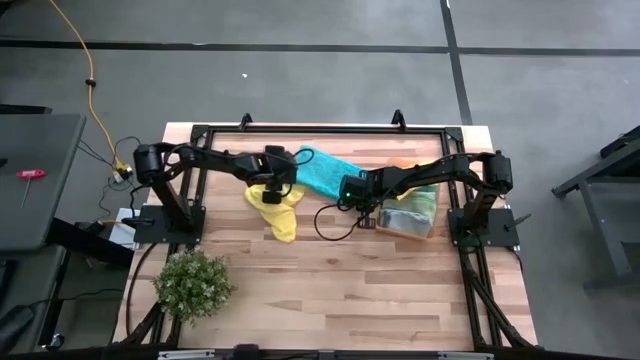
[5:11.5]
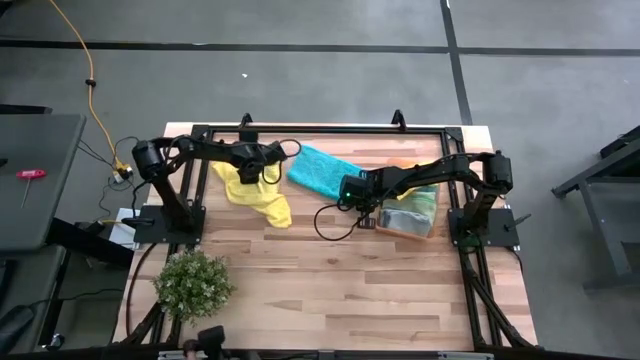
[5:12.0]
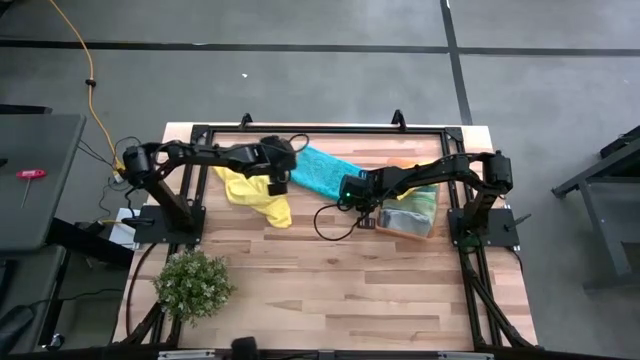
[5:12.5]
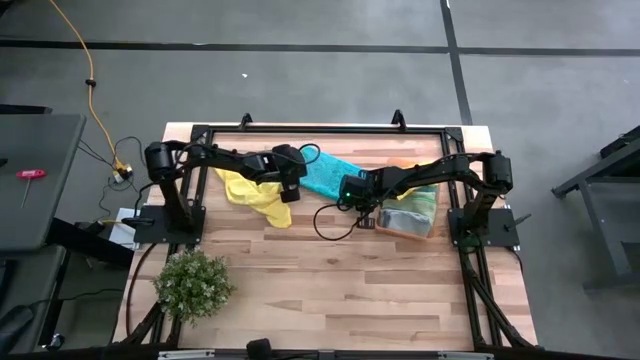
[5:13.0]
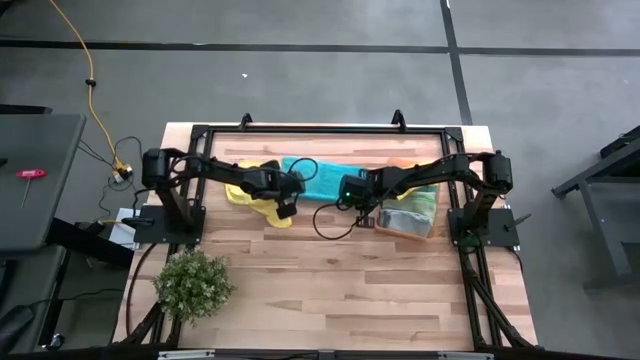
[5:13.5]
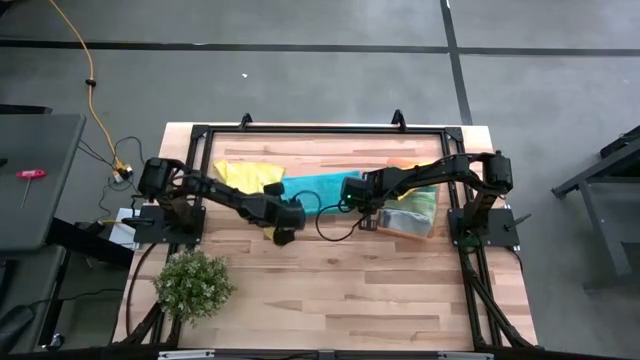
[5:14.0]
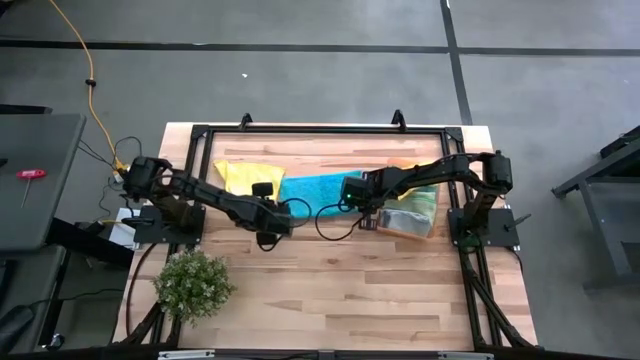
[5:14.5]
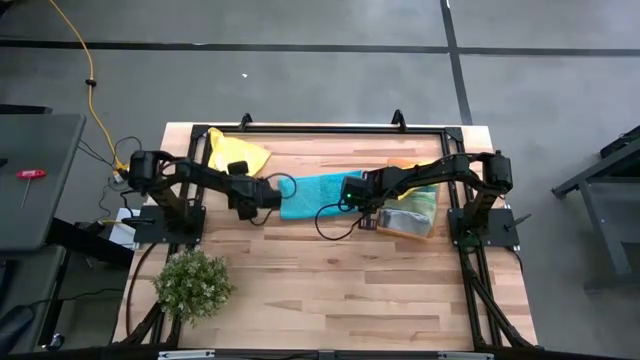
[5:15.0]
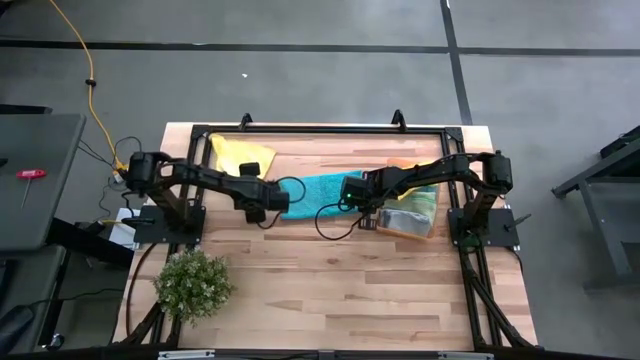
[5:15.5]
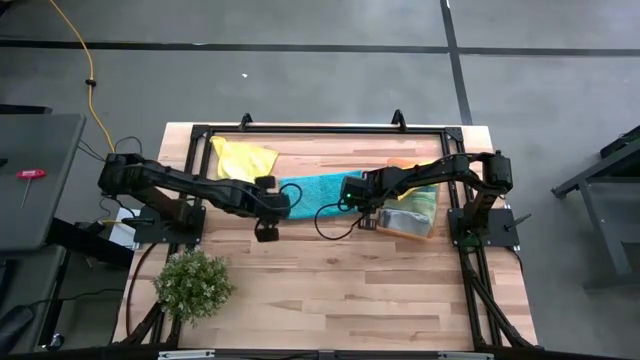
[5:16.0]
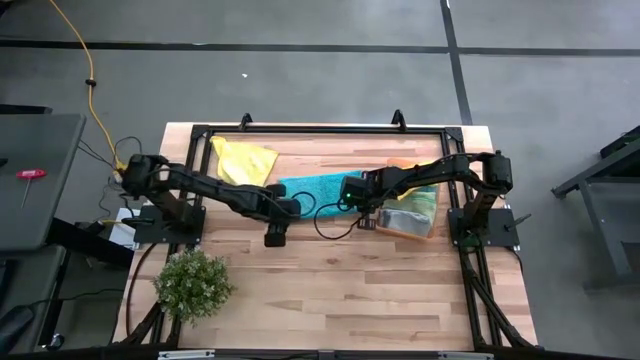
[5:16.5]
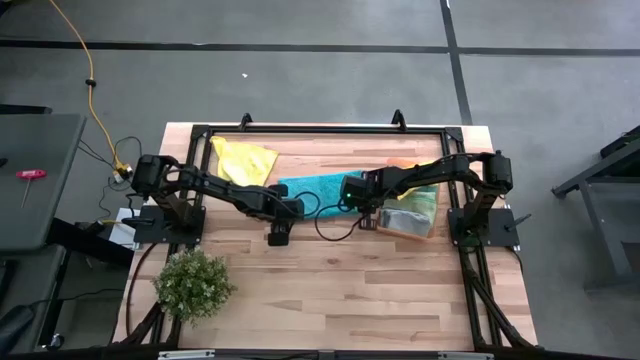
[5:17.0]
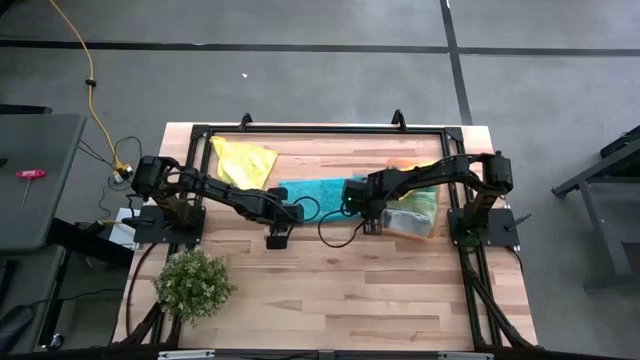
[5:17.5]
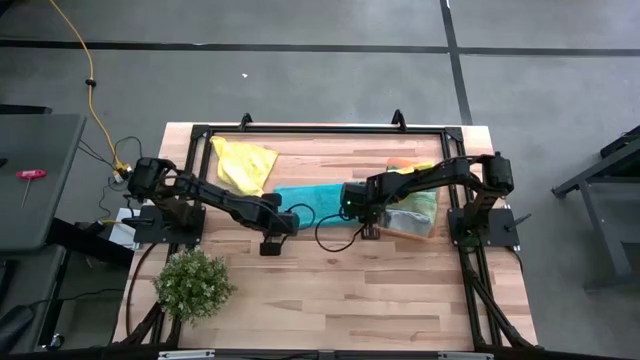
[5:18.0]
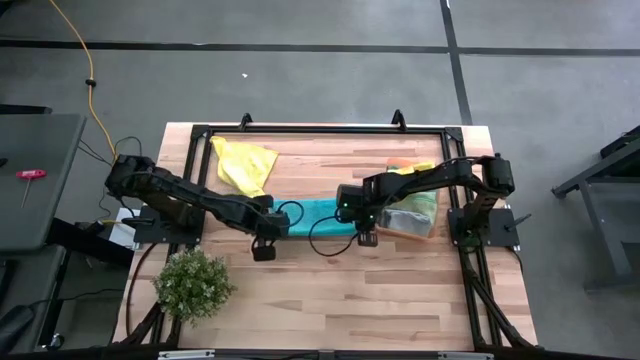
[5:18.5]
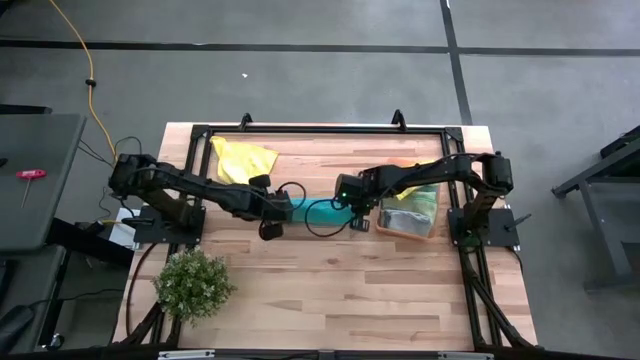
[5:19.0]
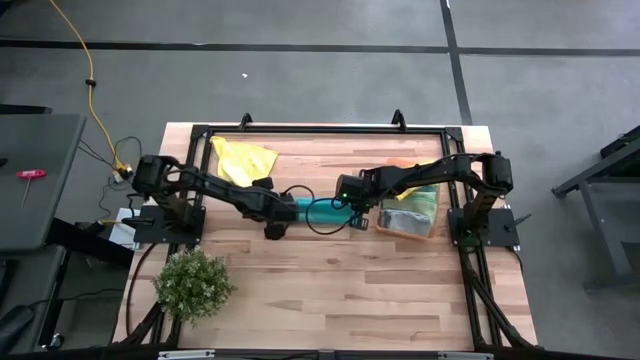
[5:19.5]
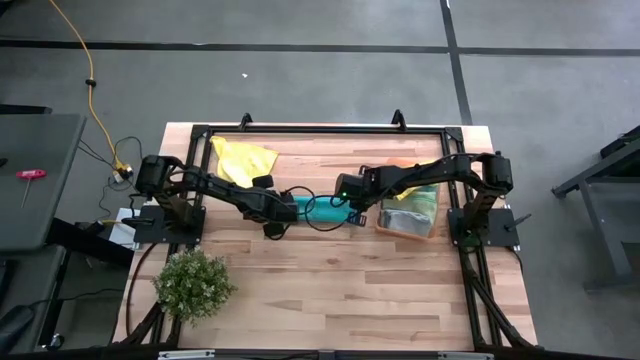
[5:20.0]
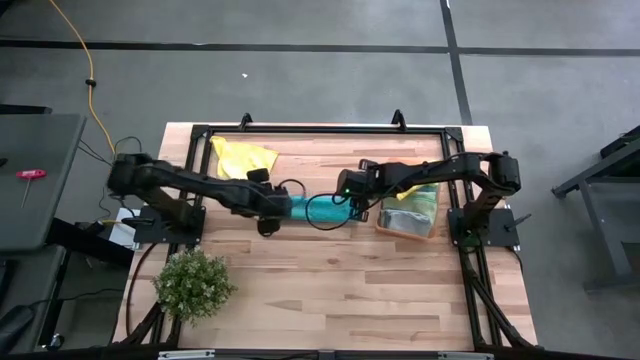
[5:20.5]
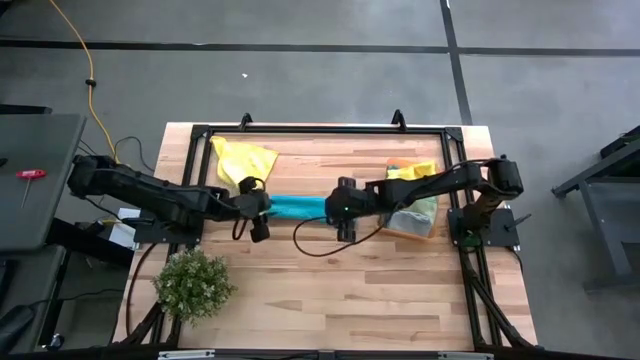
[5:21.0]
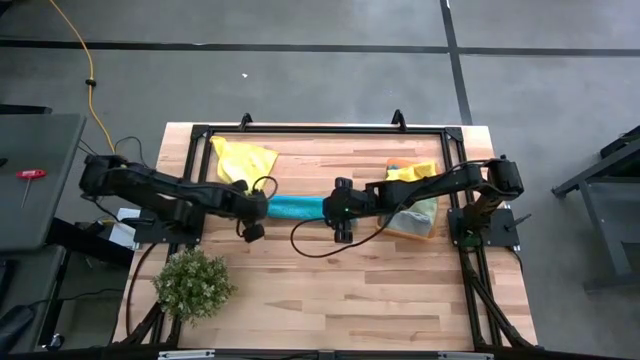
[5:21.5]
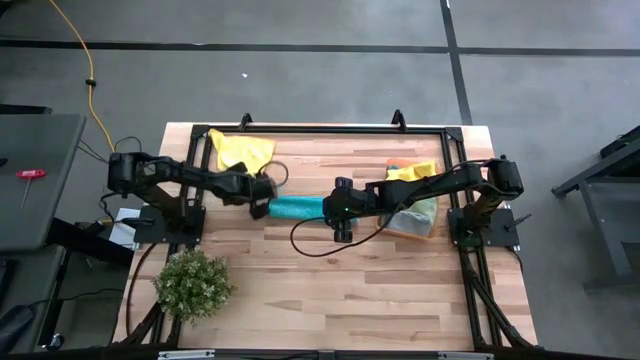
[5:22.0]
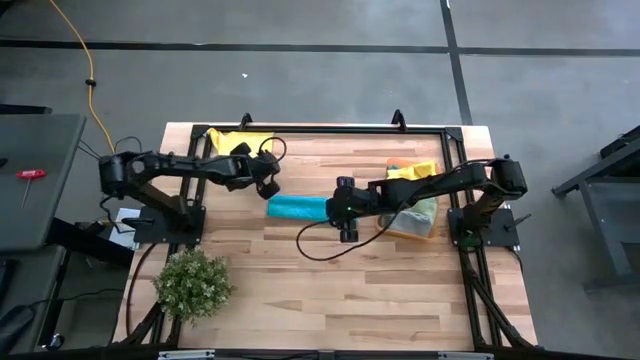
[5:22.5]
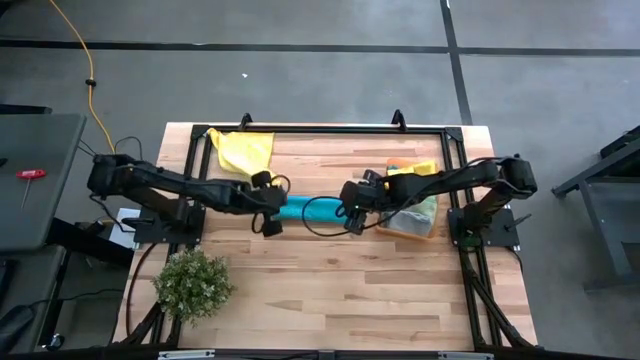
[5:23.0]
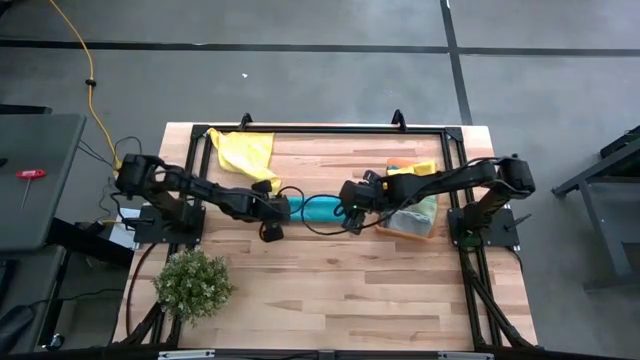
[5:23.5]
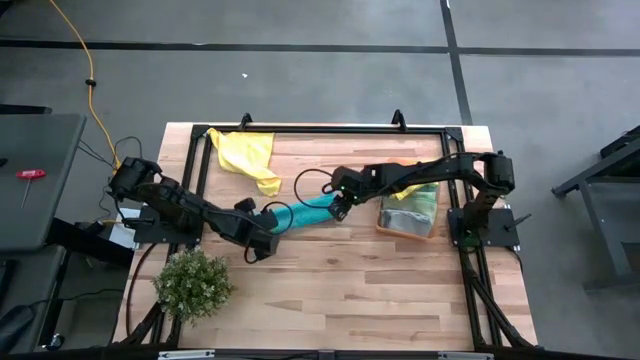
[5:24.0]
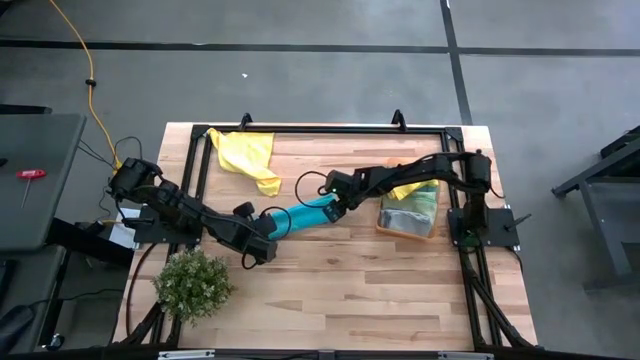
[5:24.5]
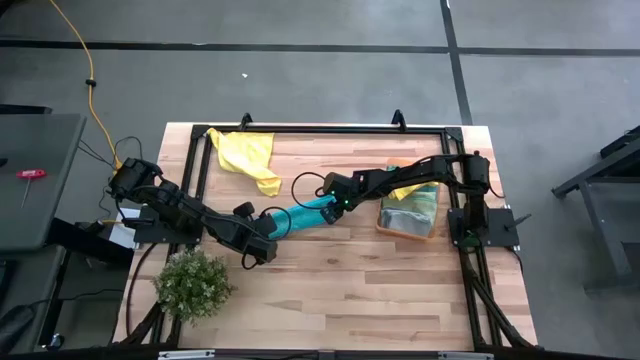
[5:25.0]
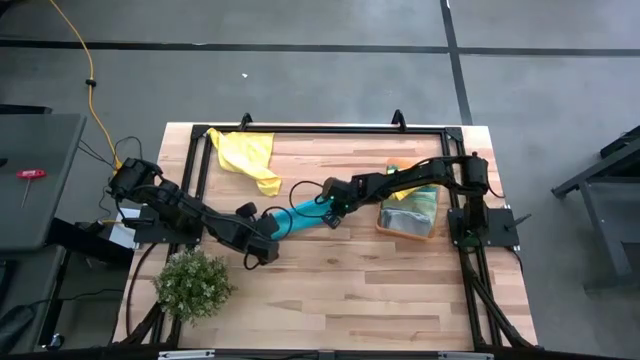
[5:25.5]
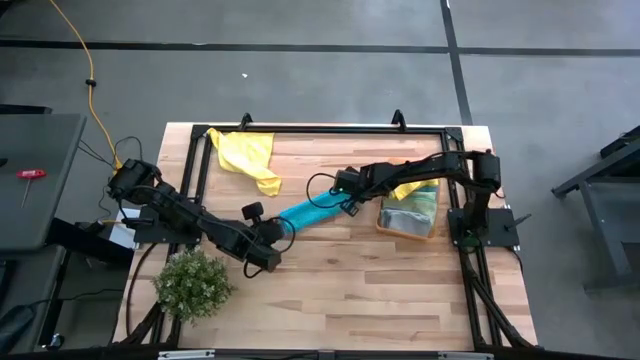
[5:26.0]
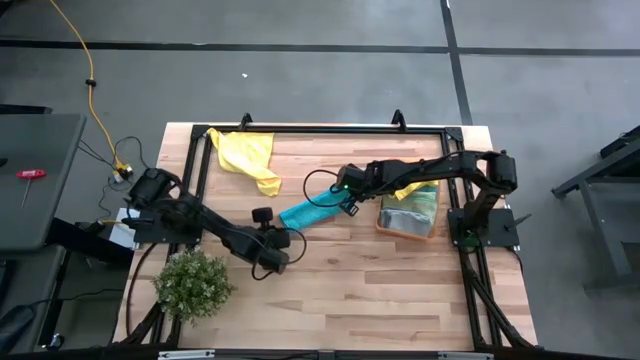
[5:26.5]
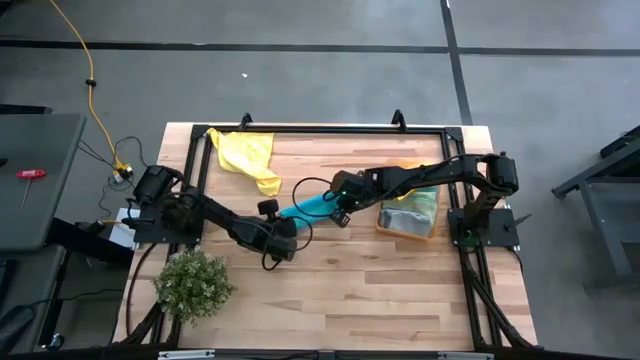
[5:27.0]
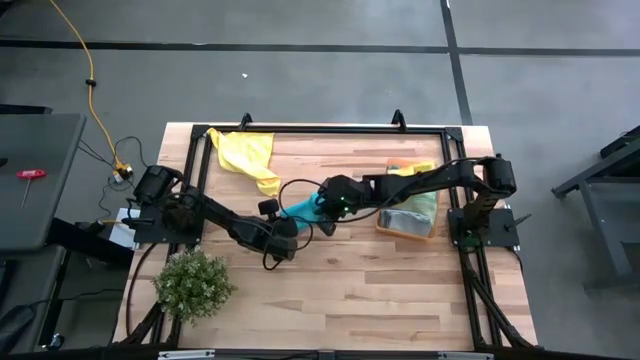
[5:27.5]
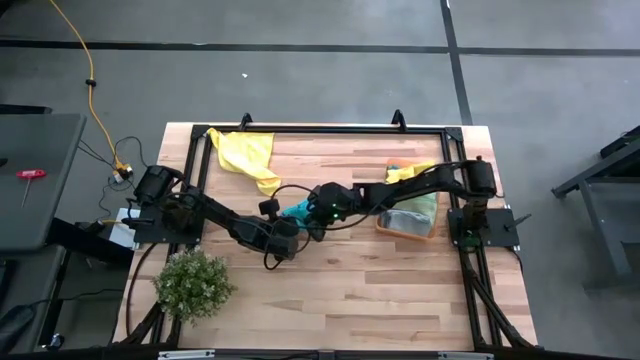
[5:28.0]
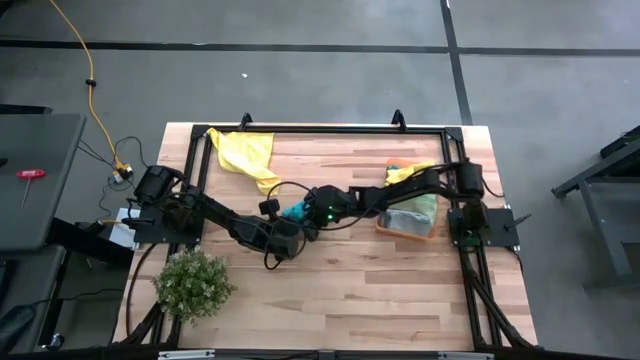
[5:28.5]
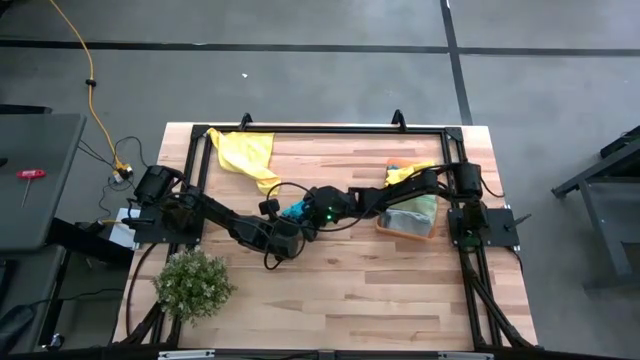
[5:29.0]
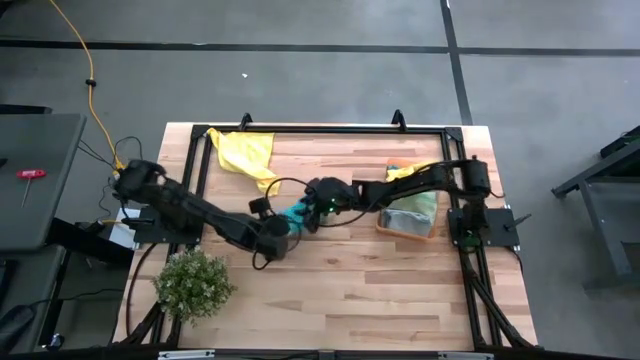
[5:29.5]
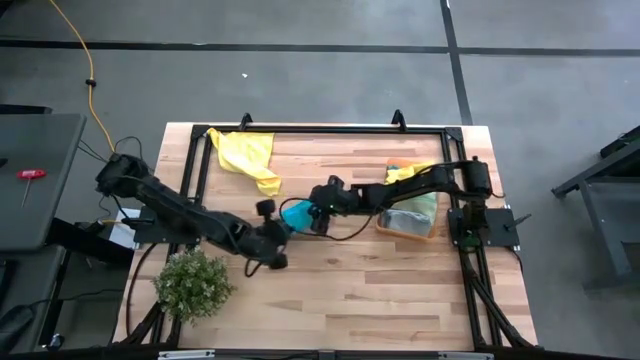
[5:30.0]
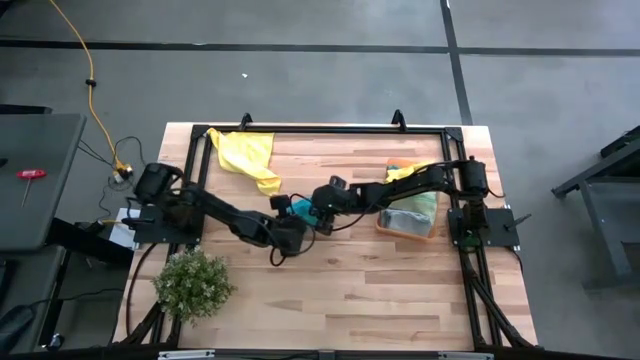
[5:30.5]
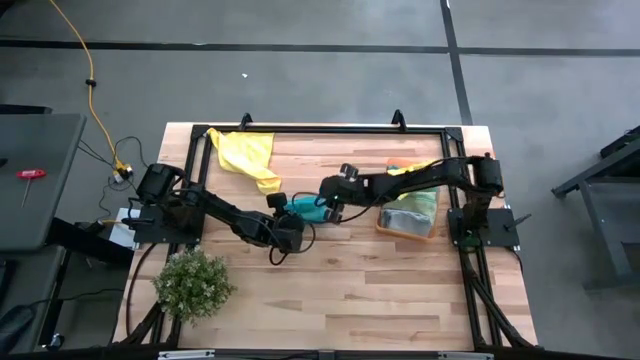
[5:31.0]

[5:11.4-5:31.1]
Task: Fold microfiber towels
Fold the blue microfiber cloth
